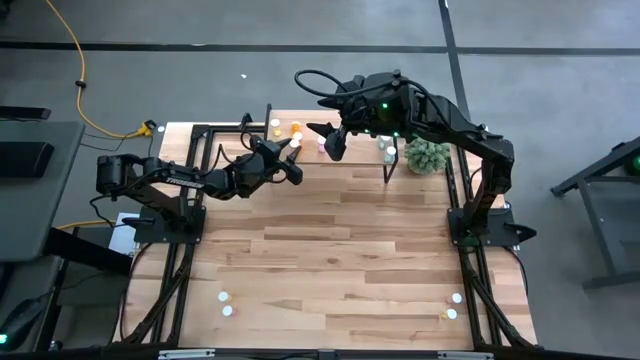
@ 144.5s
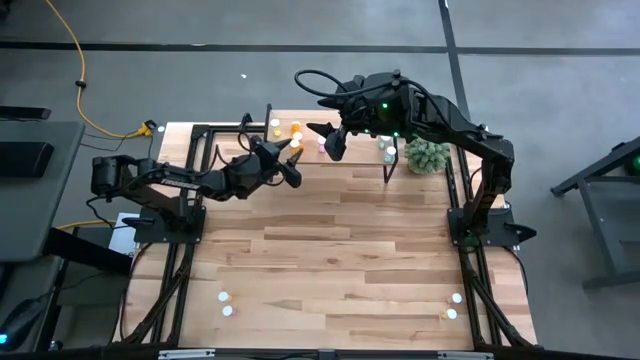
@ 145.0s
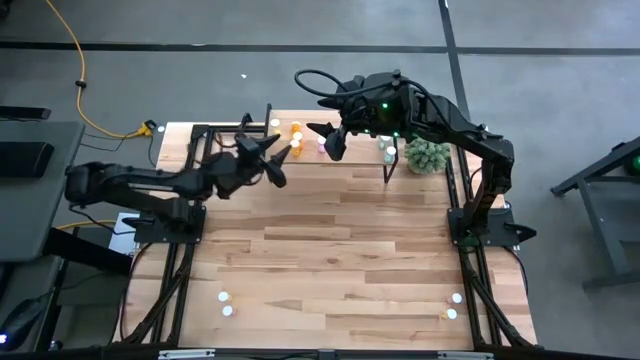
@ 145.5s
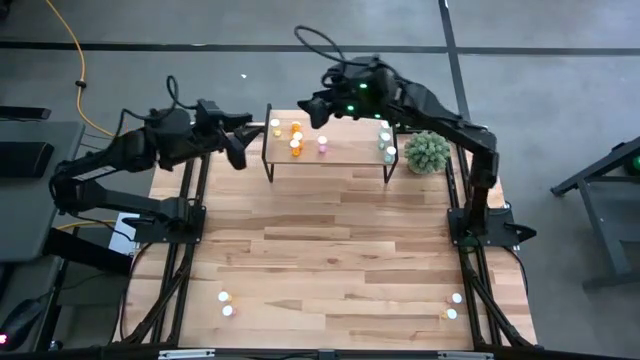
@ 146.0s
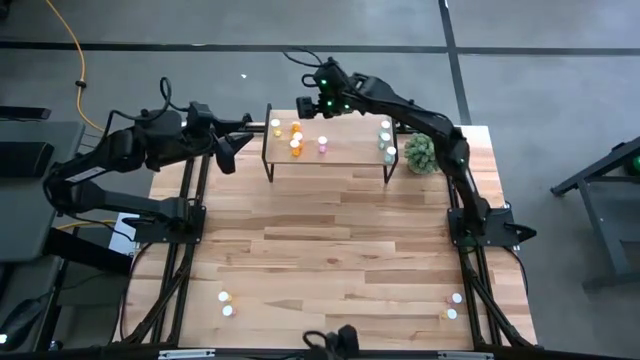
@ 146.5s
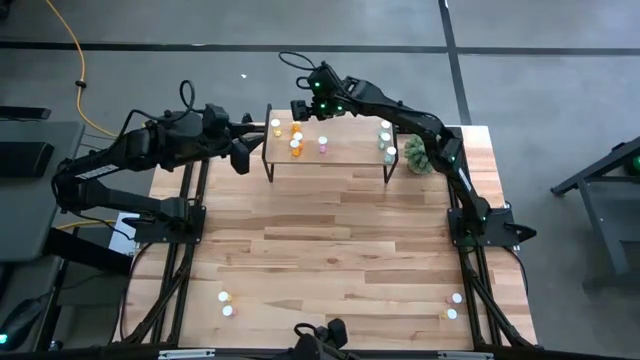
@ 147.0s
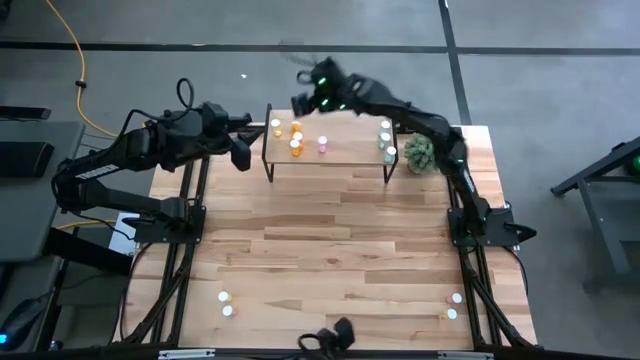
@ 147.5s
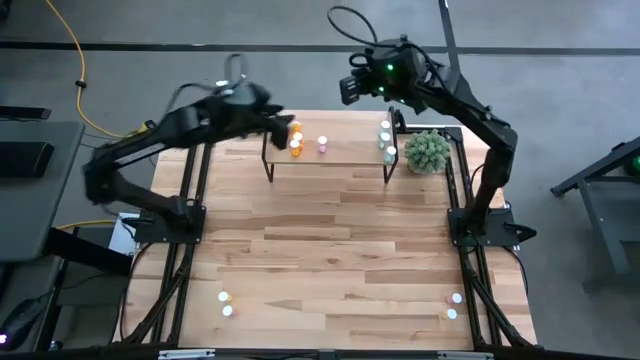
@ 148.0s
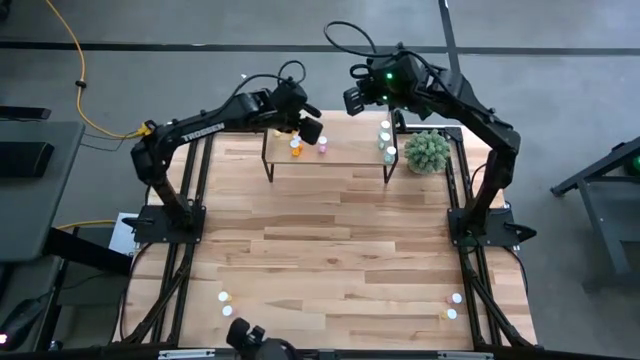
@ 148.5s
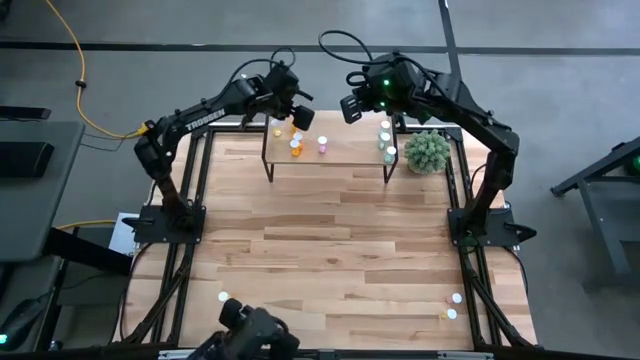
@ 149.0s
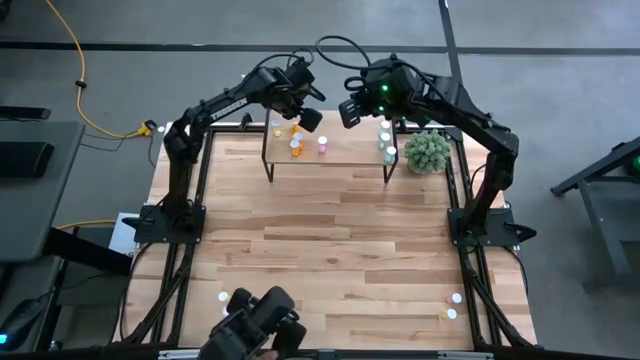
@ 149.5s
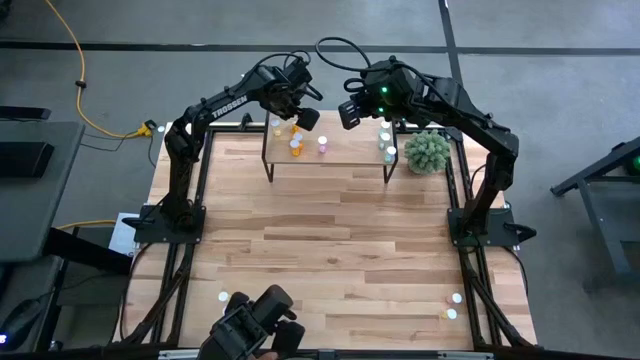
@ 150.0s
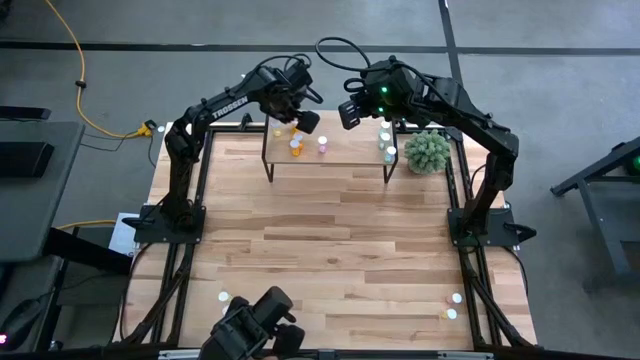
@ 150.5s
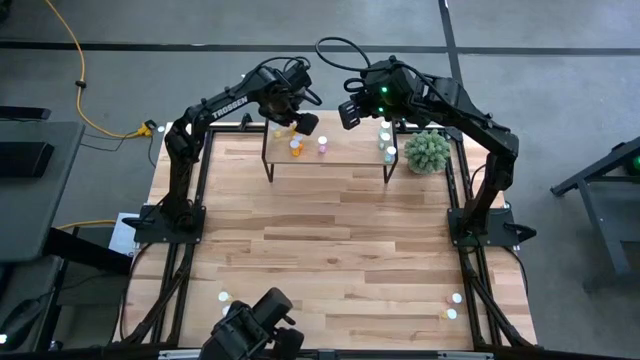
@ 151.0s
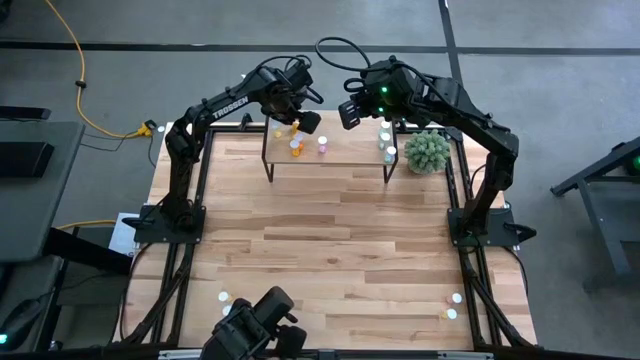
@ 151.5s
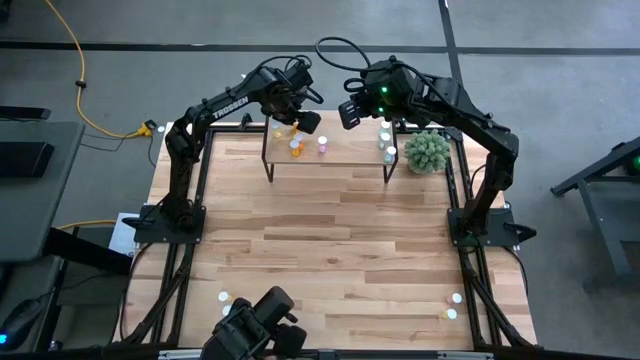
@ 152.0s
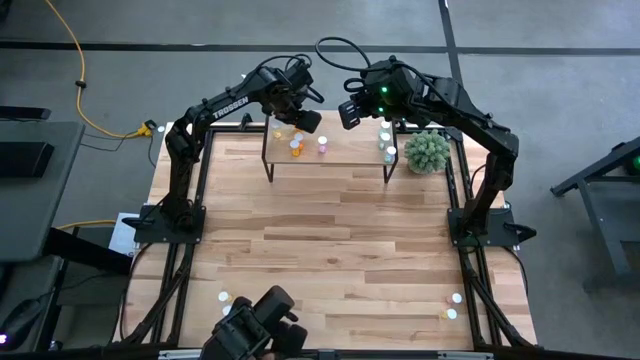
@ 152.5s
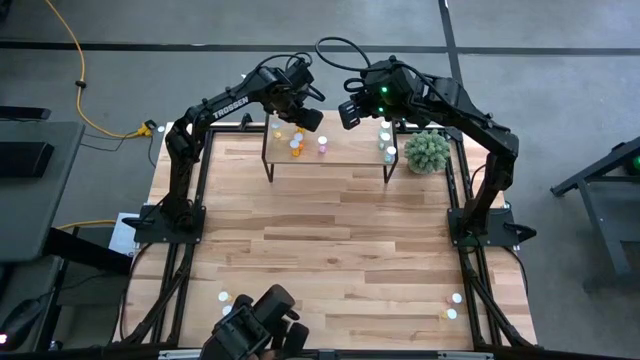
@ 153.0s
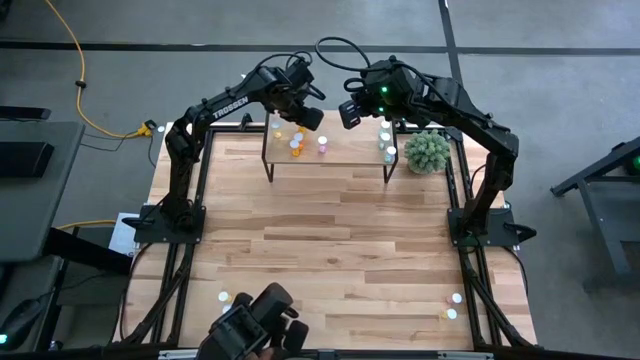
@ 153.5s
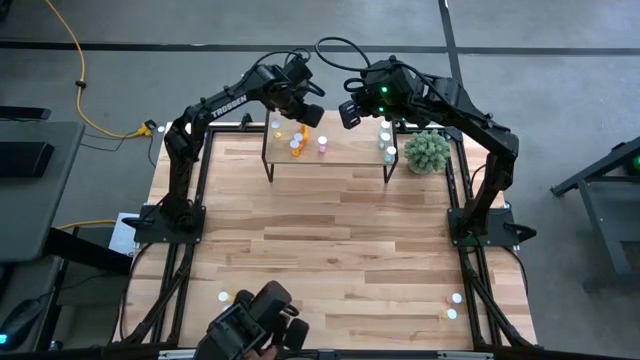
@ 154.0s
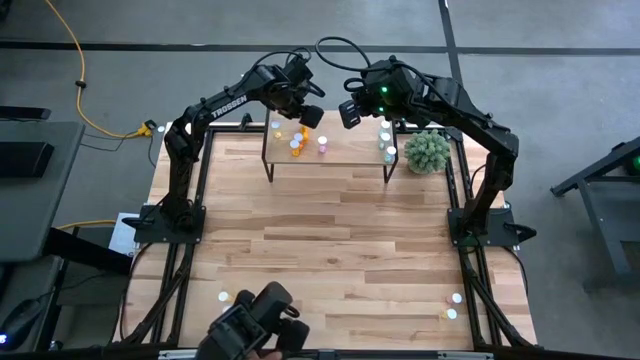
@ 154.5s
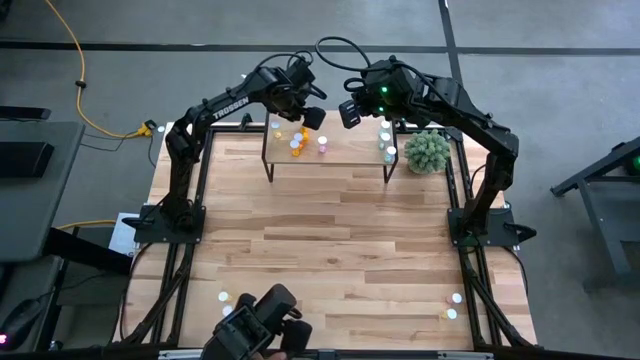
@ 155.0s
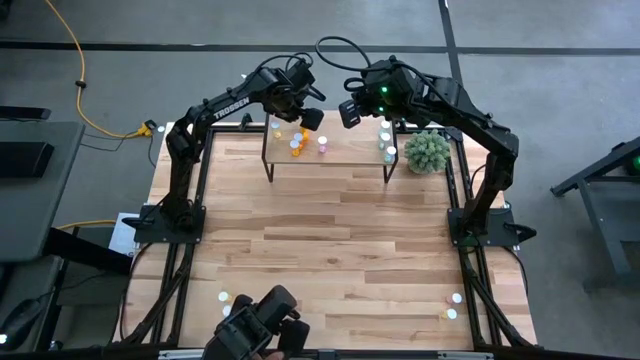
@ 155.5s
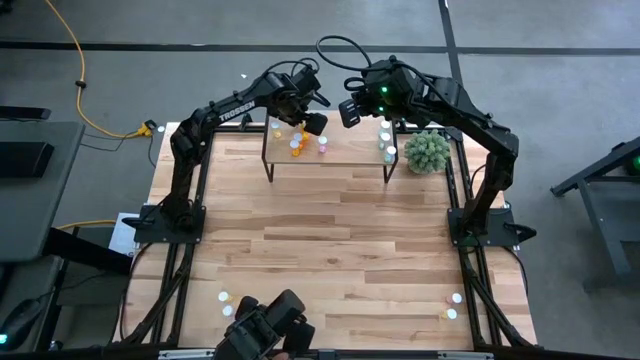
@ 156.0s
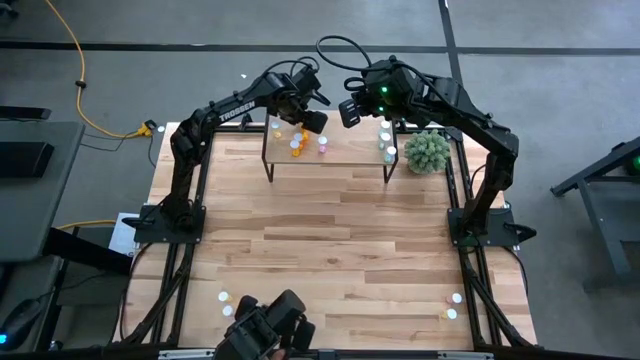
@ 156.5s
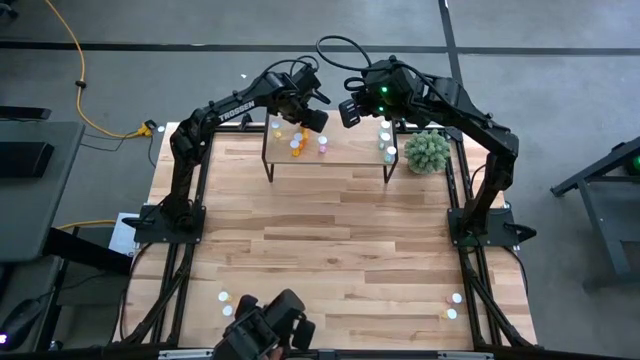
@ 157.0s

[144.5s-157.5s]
Task: Pick and place medicine bottles onto shelf by color
Adjust the orange pill bottle on the shelf

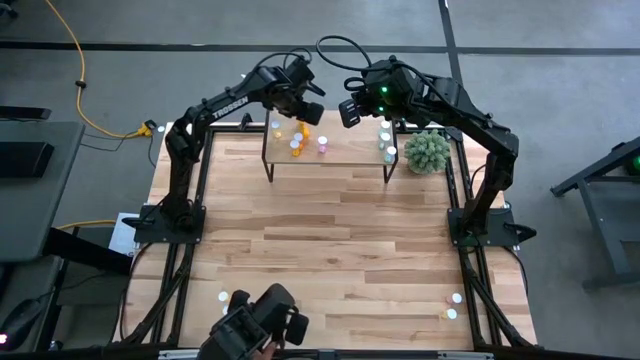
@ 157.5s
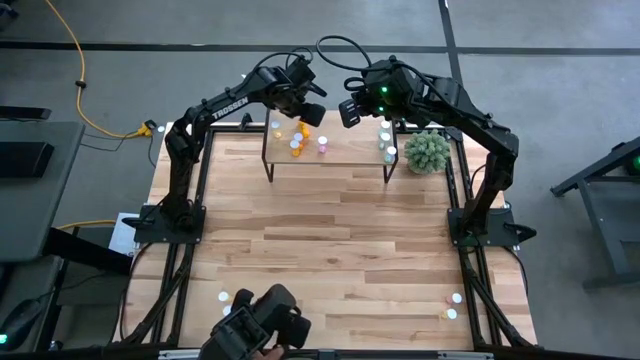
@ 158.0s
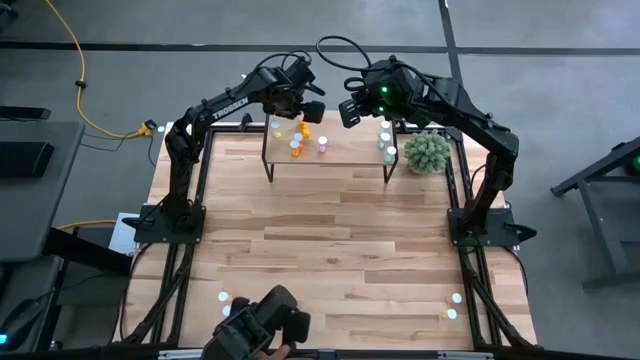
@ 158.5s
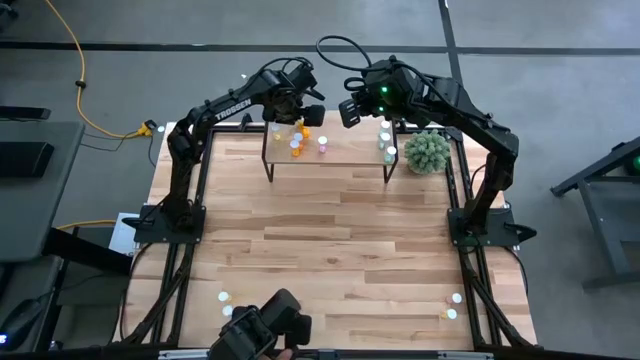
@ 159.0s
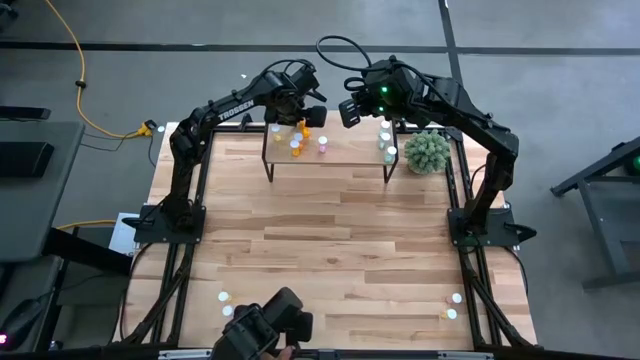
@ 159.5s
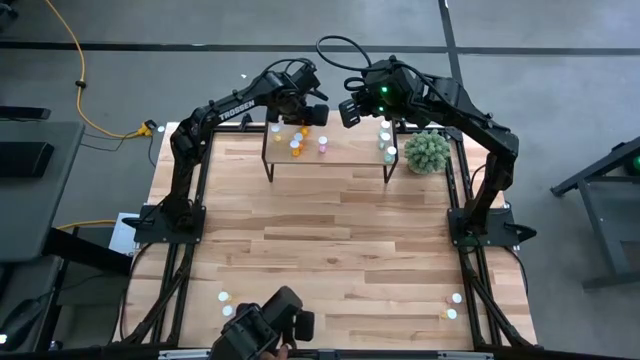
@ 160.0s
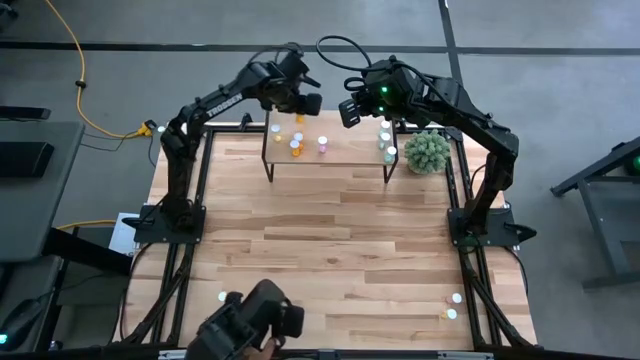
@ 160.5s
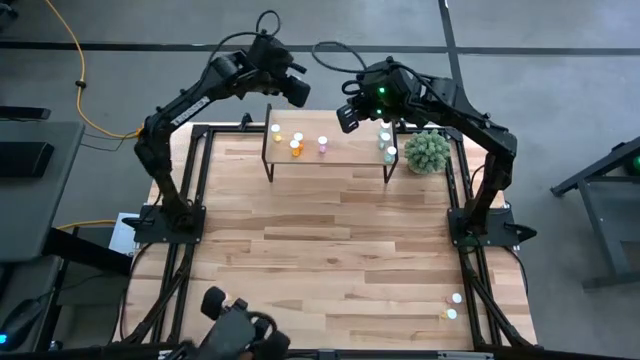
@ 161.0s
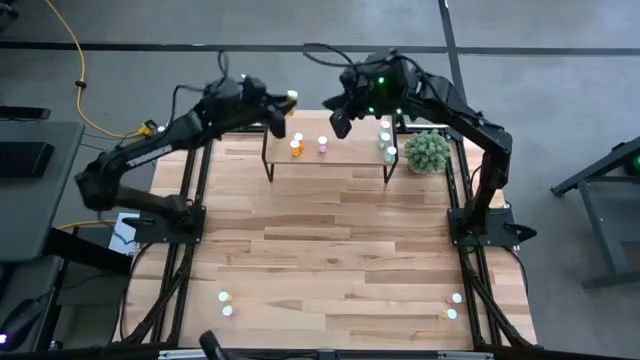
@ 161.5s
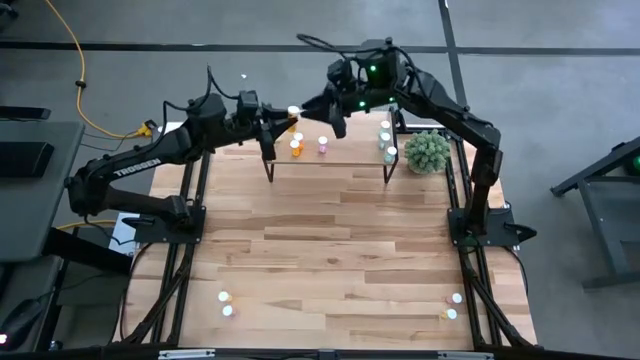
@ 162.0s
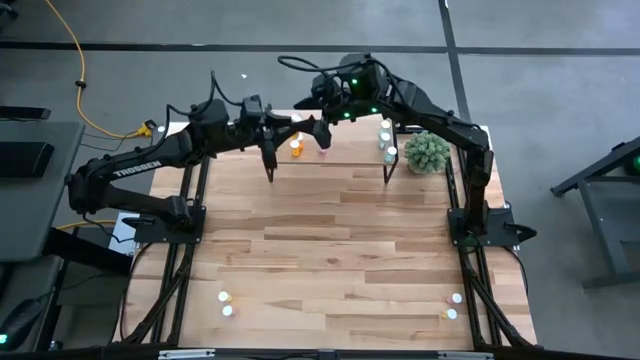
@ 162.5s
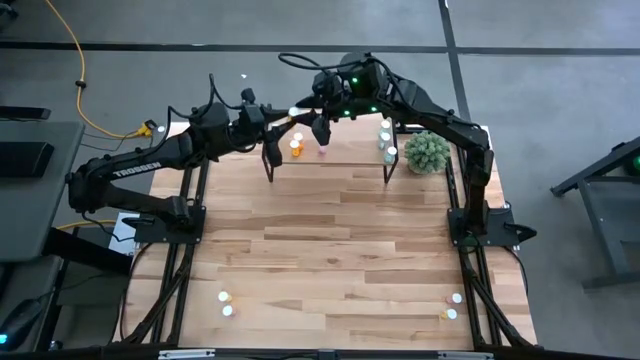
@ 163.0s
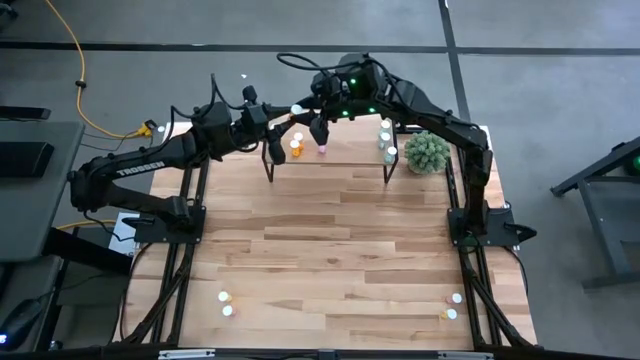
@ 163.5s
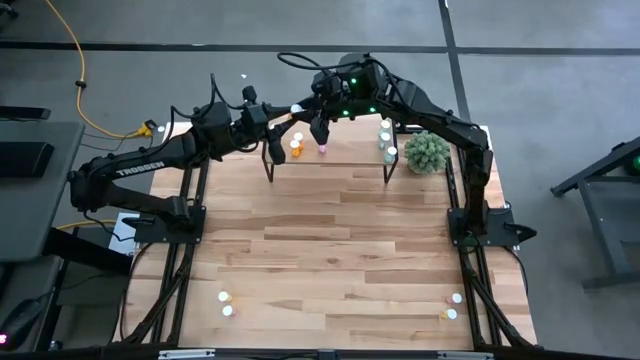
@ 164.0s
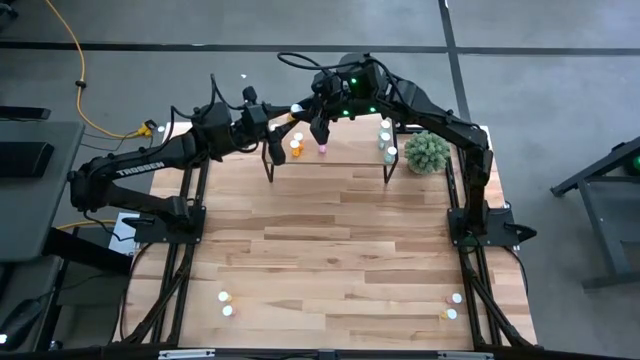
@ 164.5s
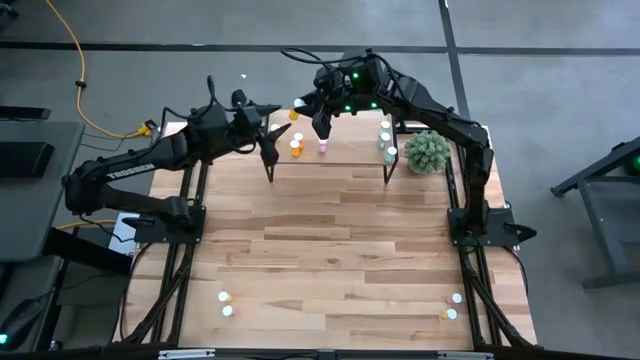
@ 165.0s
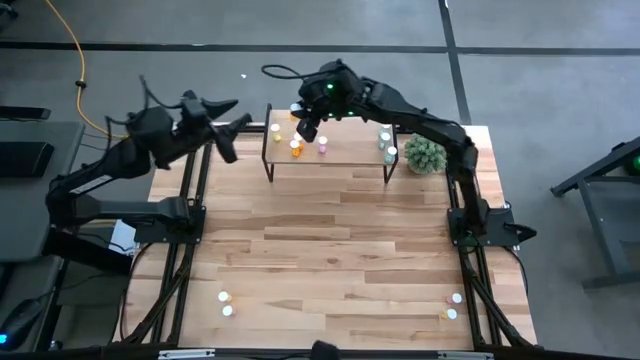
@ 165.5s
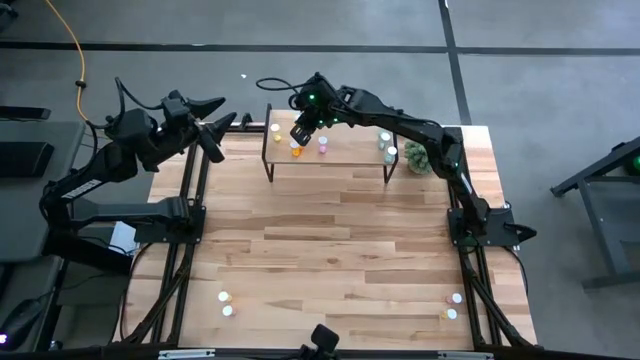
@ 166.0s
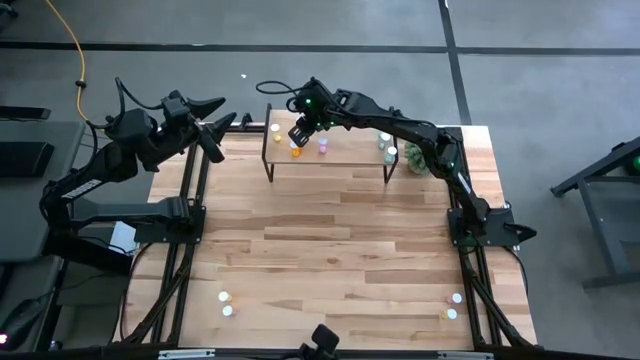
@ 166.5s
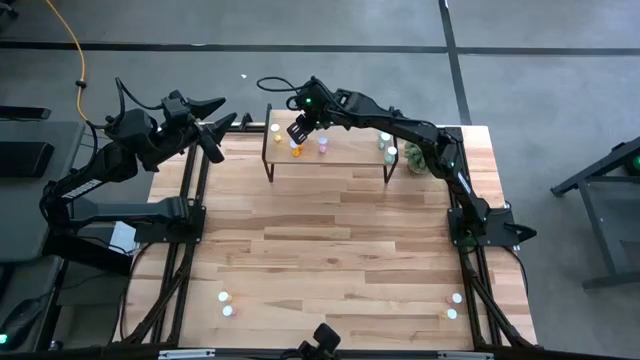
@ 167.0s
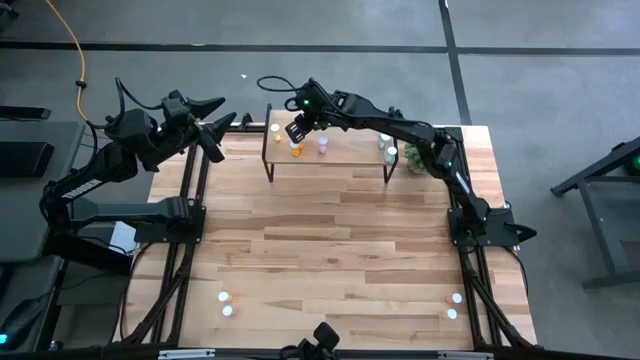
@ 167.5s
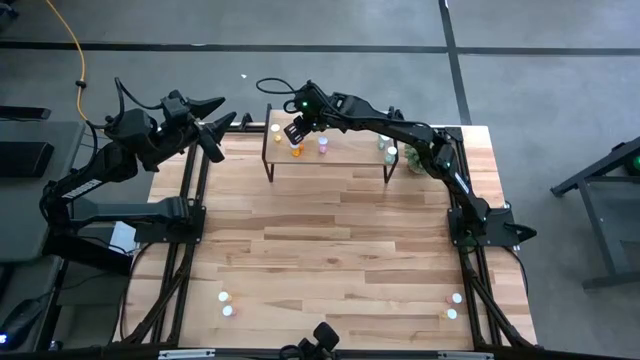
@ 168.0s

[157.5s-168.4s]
Adjust the orange pill bottle on the shelf
